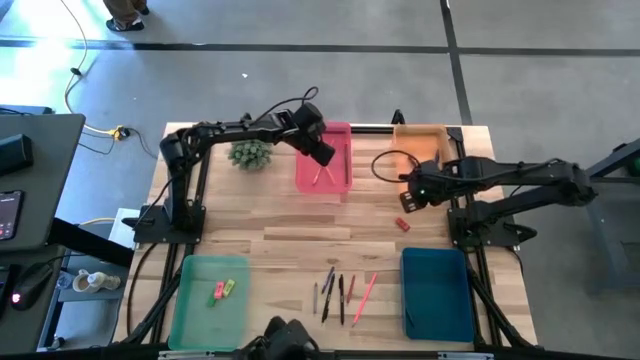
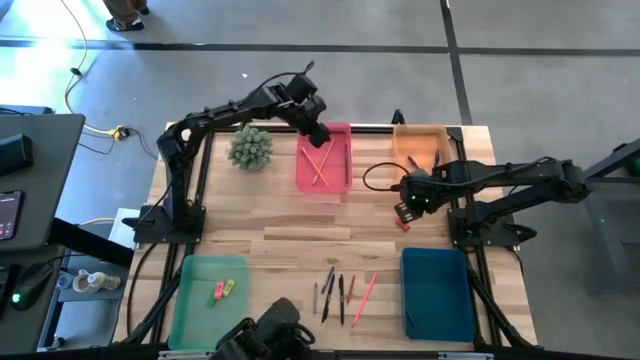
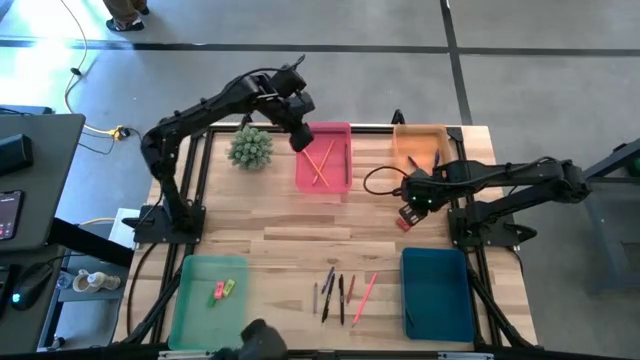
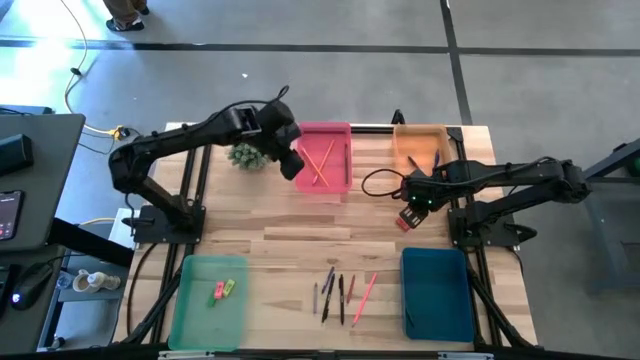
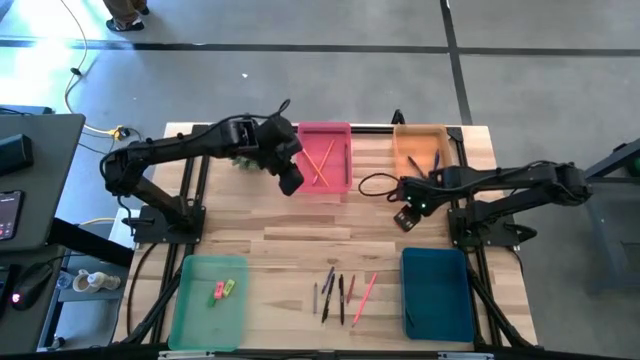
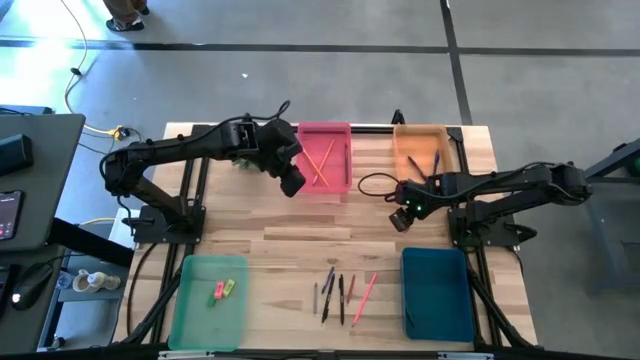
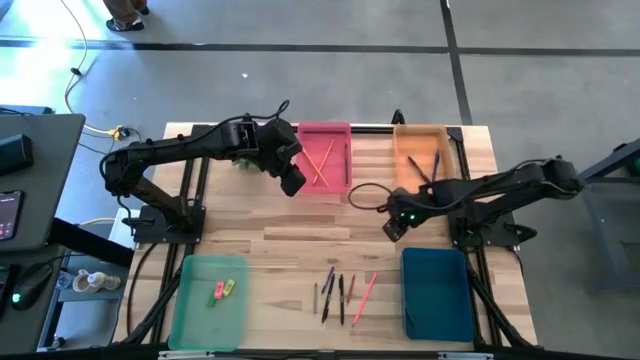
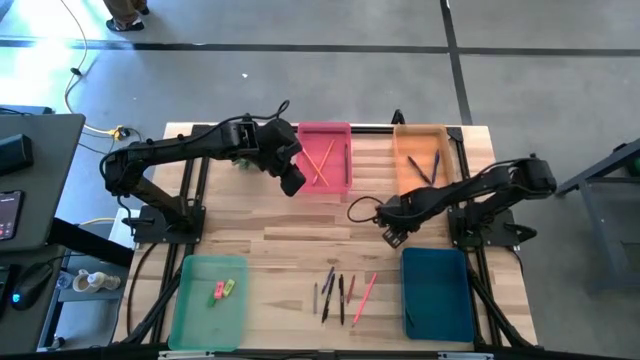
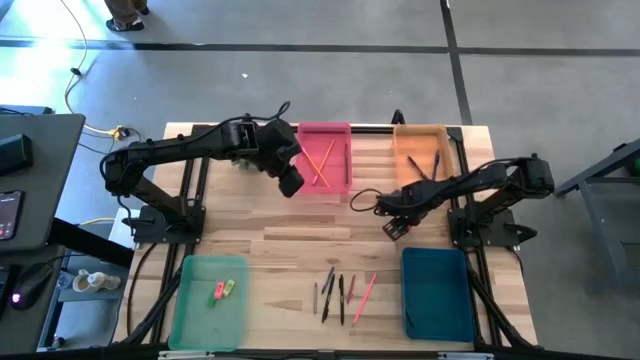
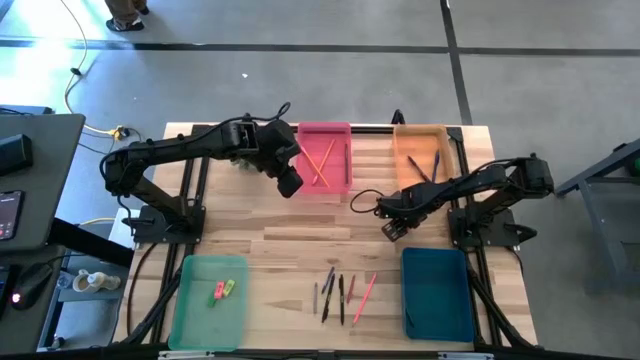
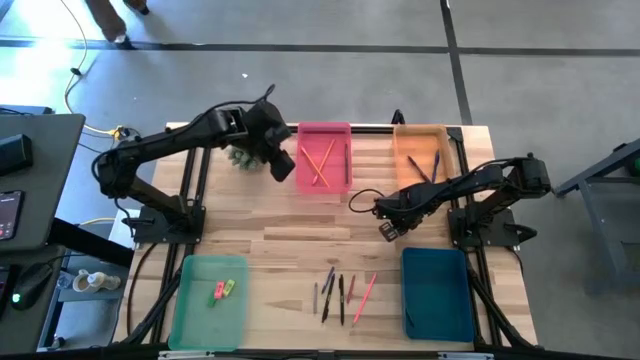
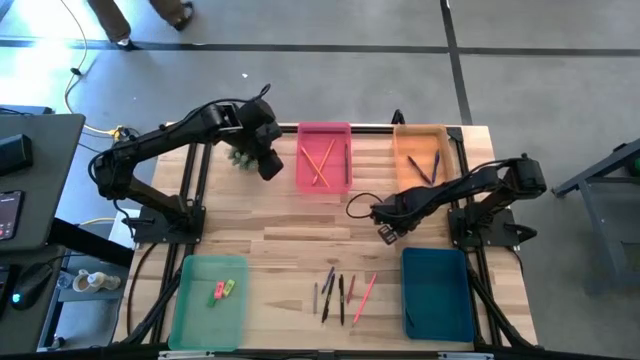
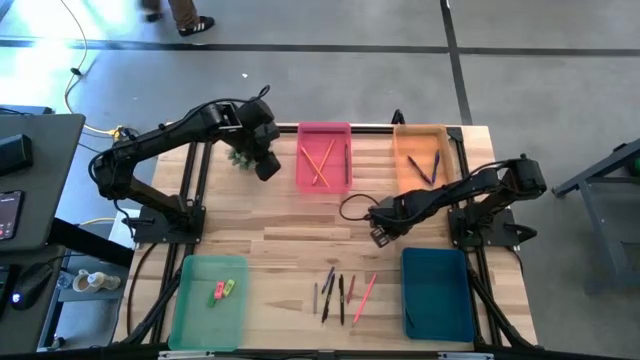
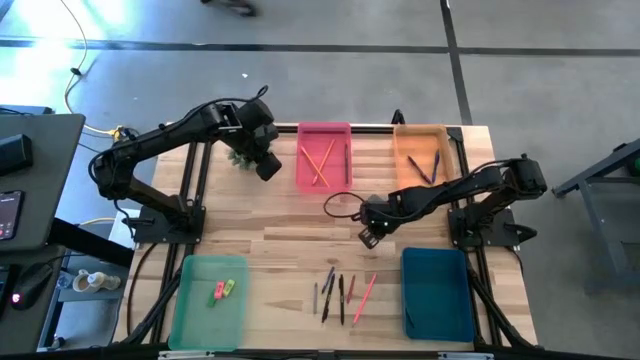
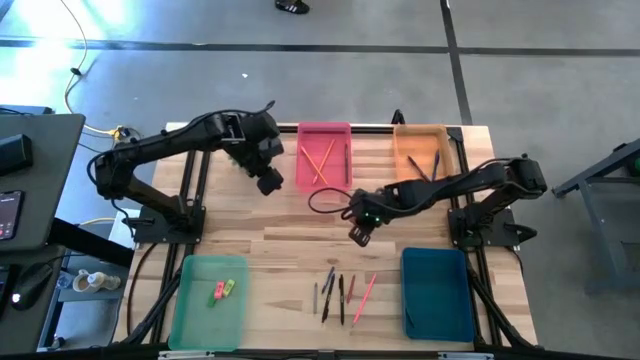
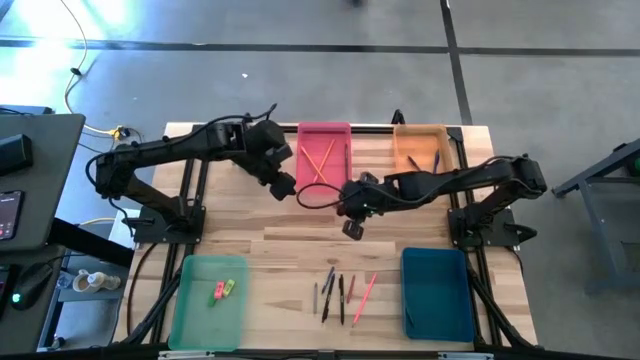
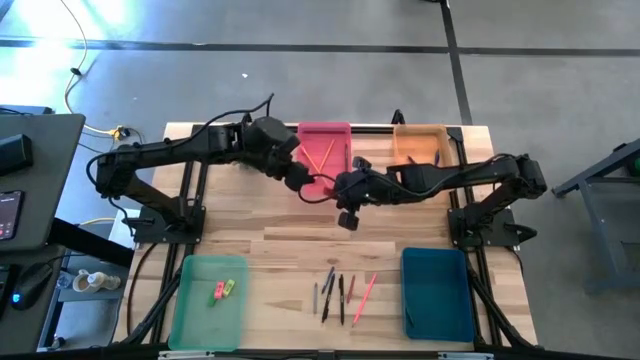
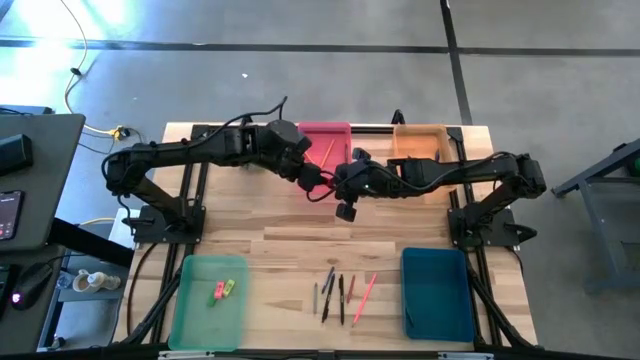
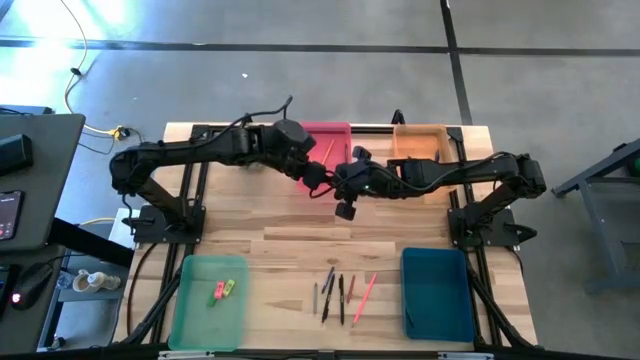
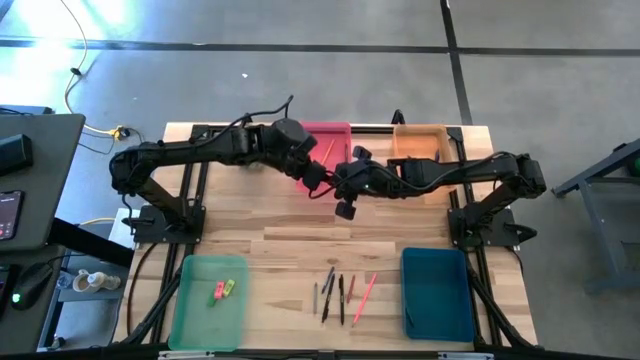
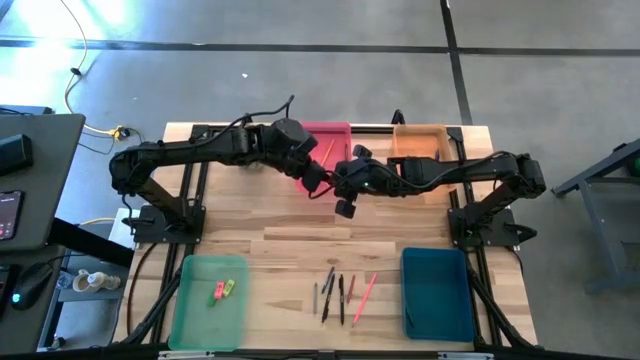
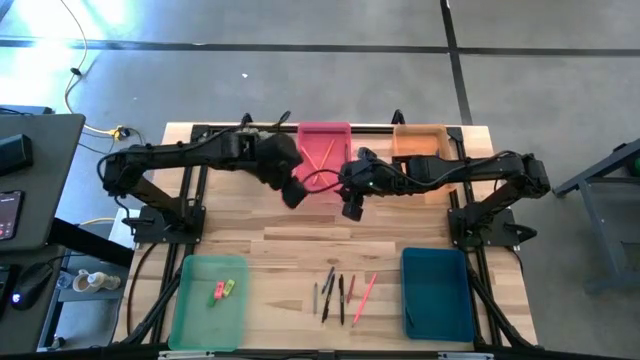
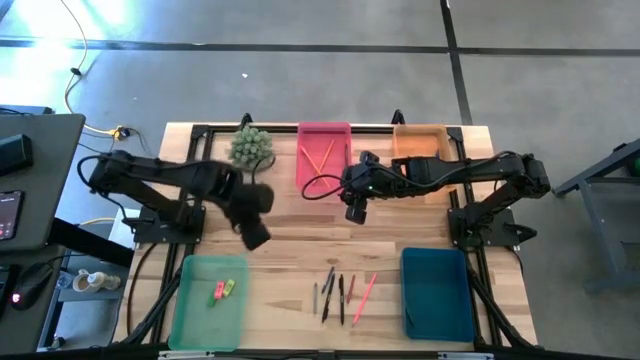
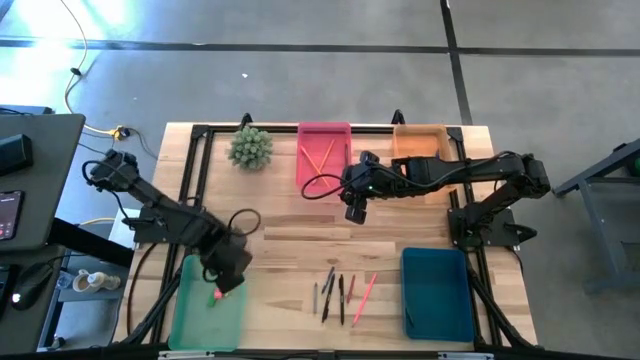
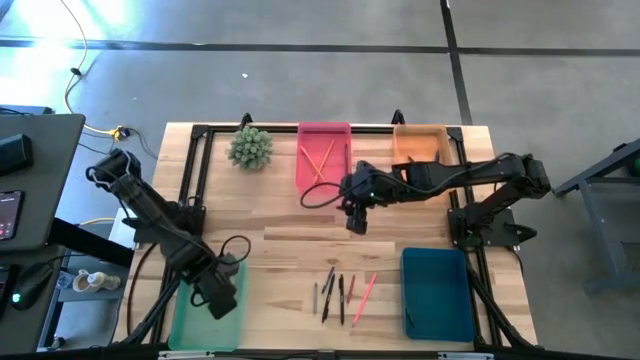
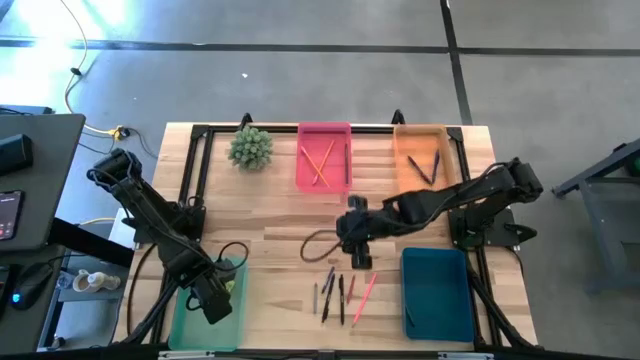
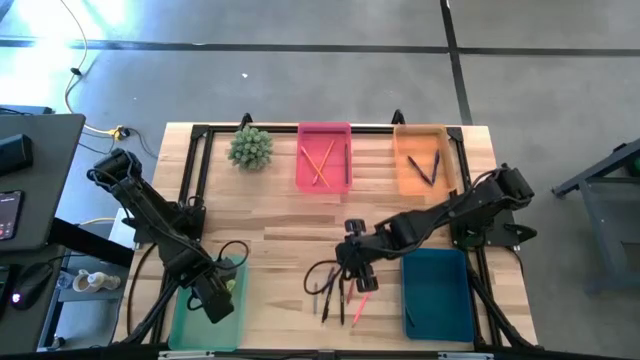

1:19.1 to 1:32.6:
Task: Sort crayons/erasers/pens/pencils in bins
Put the red eraser into the light green bin

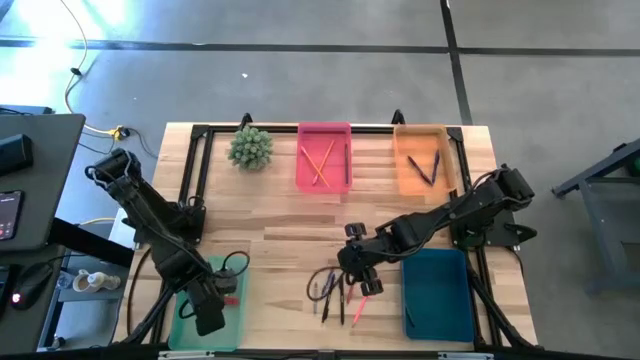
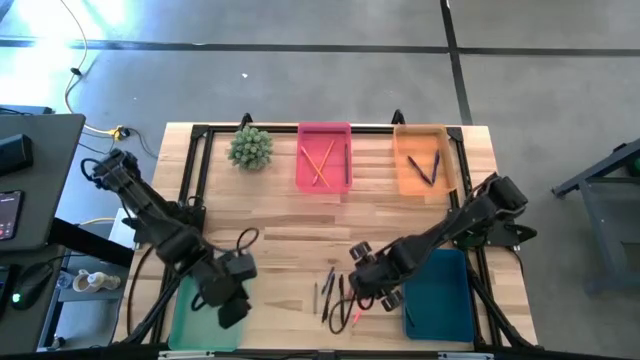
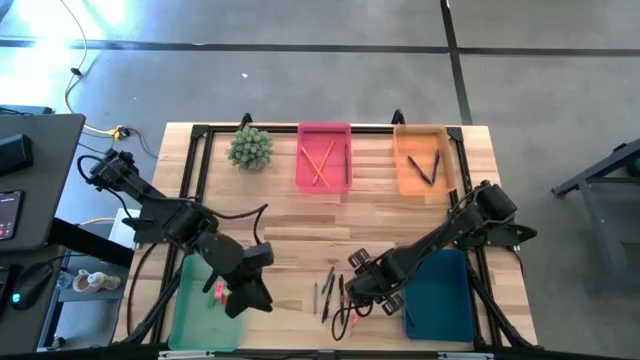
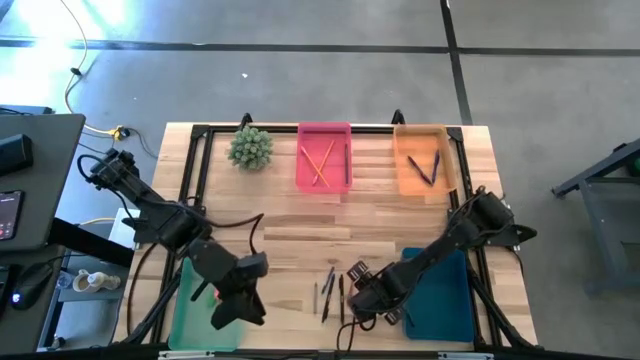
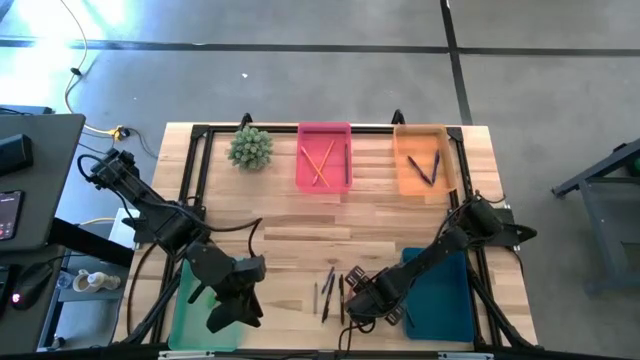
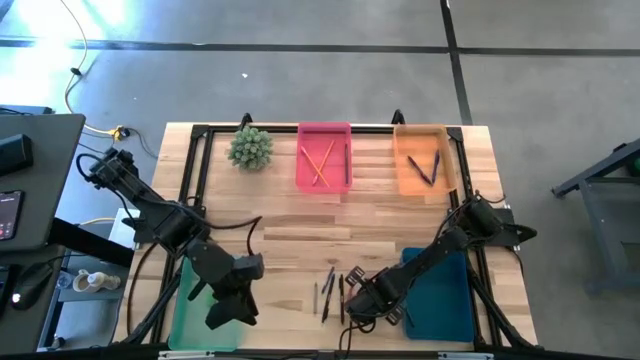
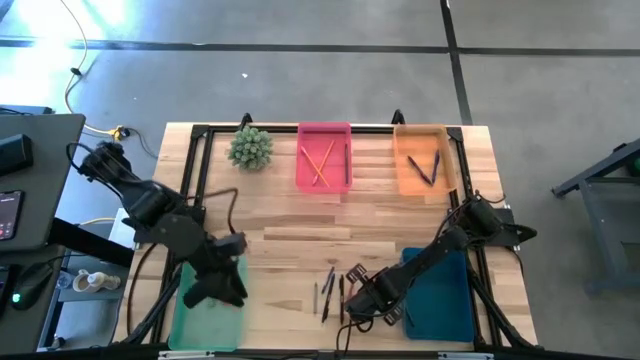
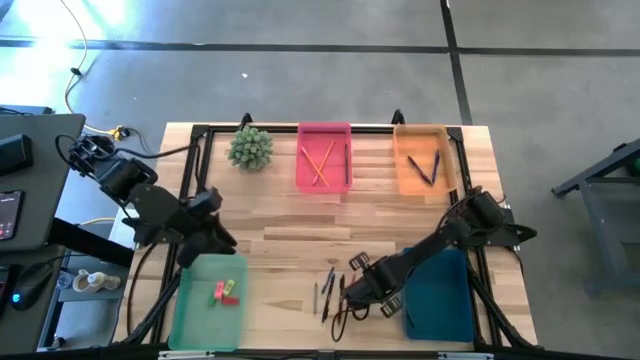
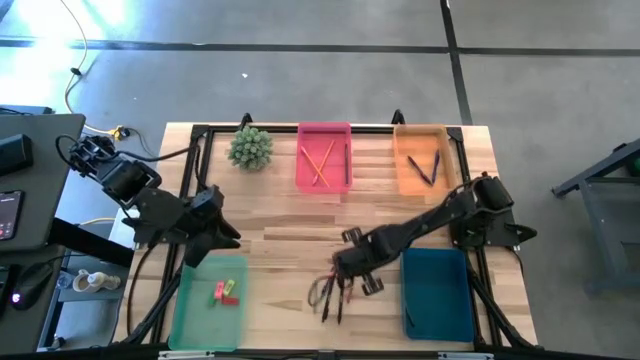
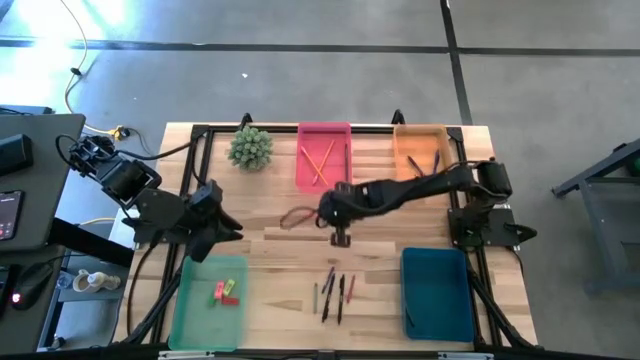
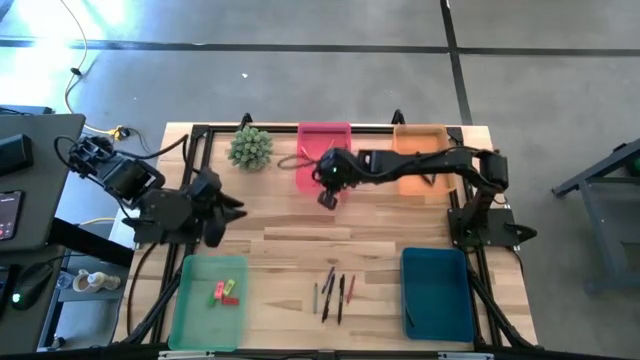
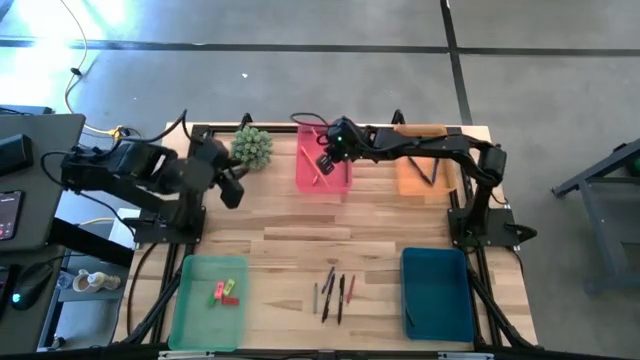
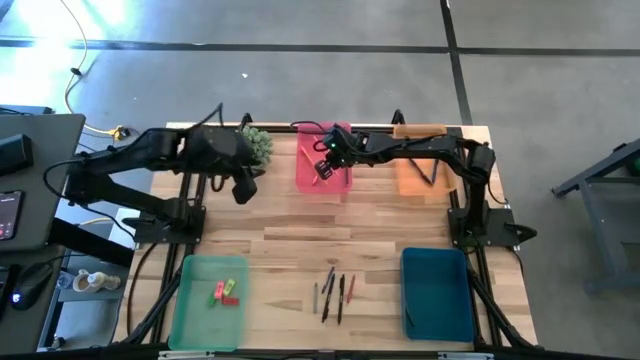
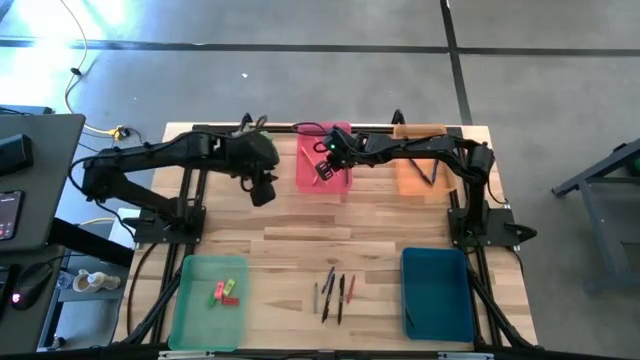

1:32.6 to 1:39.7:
Put the pink pencil into the red bin

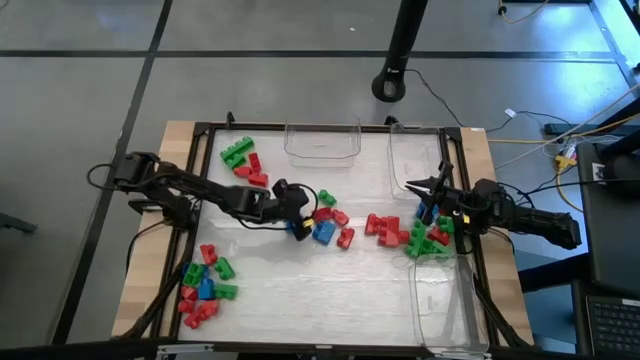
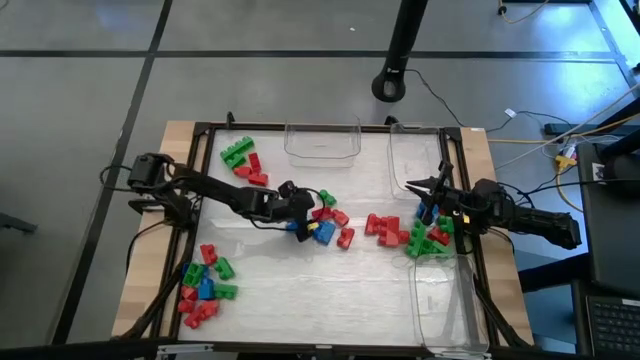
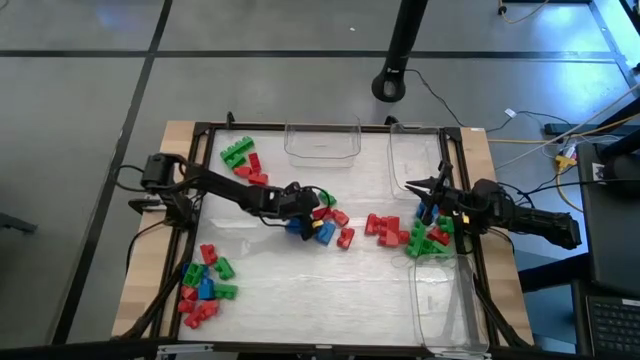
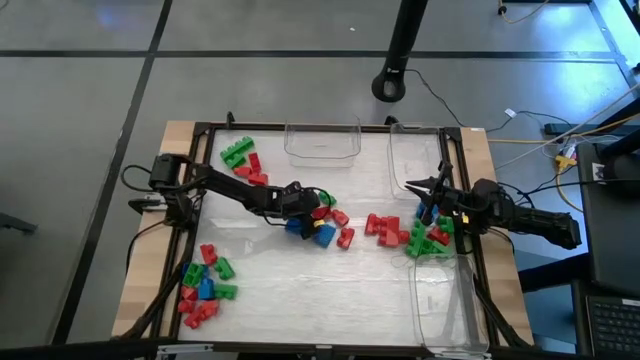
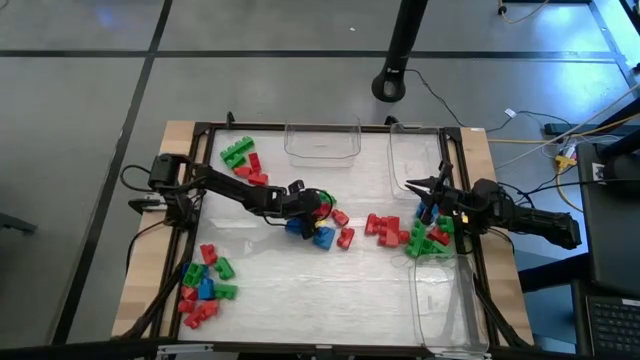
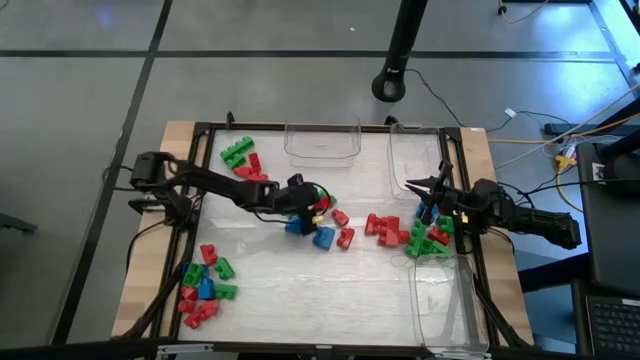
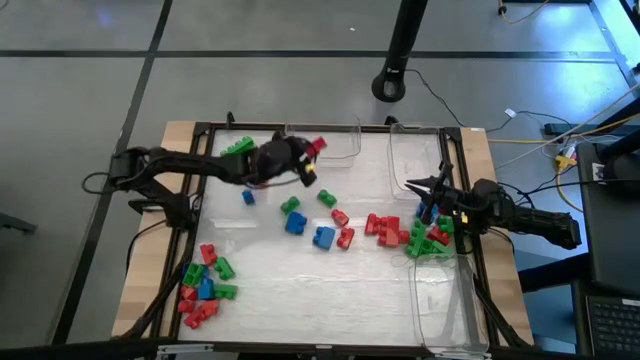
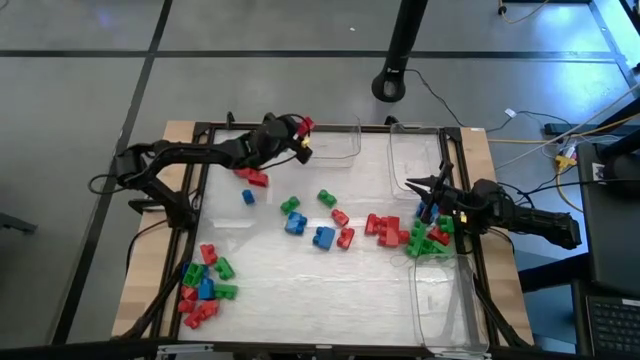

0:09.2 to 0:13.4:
Task: Sort blocks
Put the red game piece into the top left transparent bin
